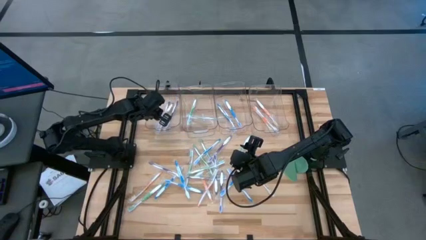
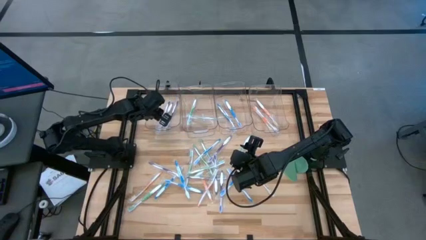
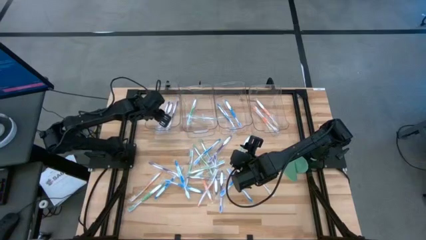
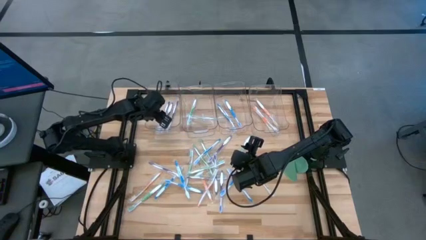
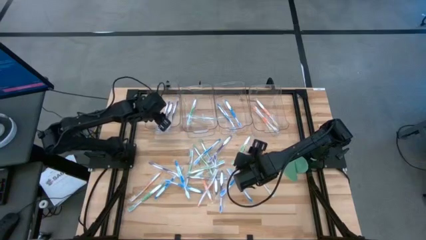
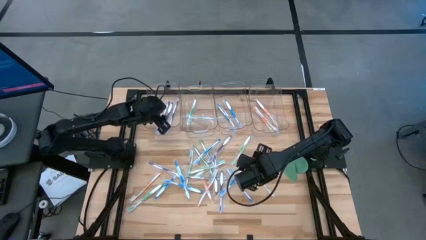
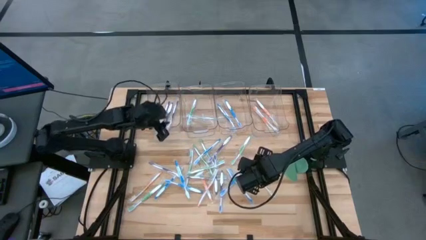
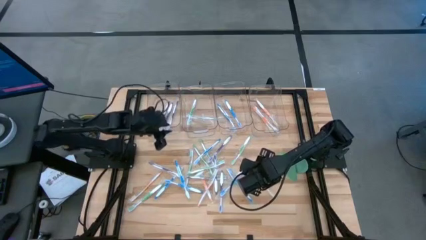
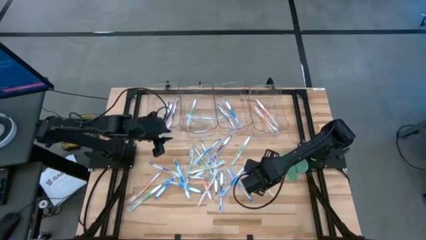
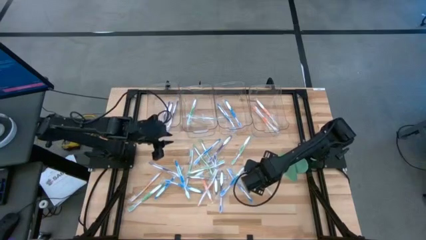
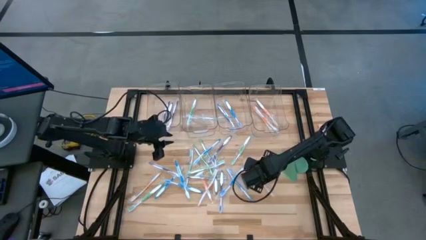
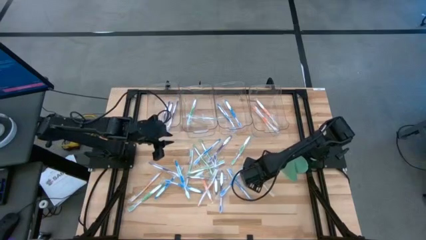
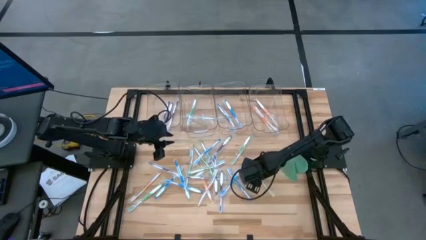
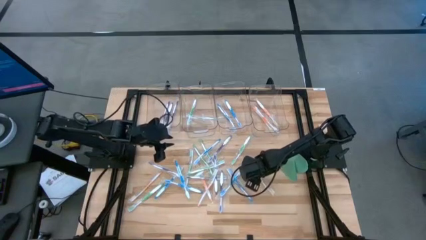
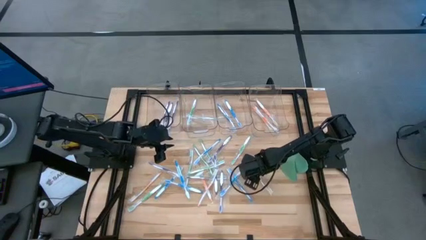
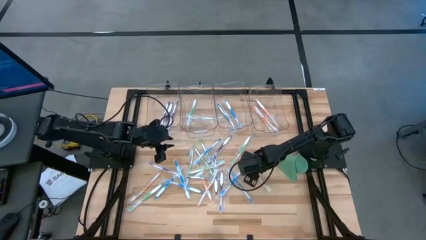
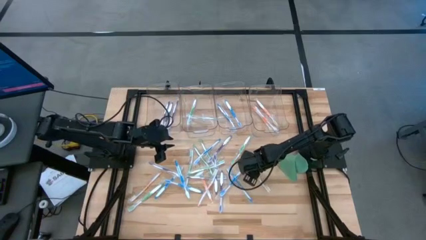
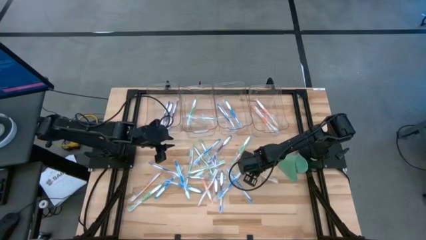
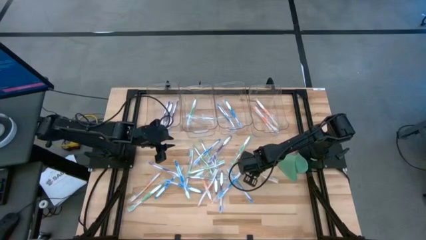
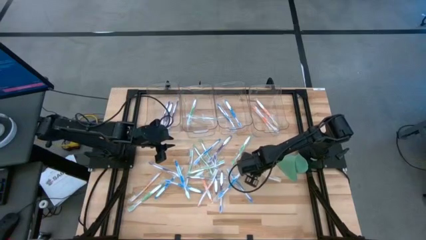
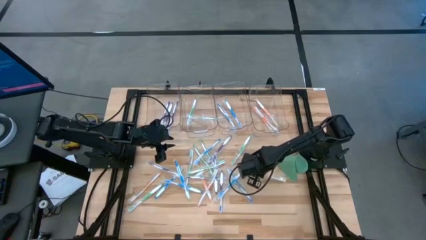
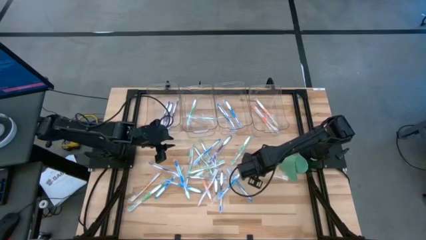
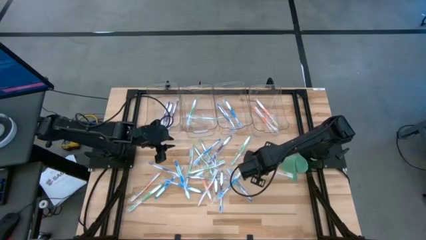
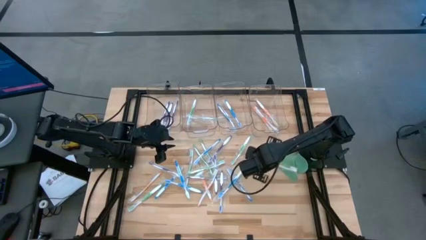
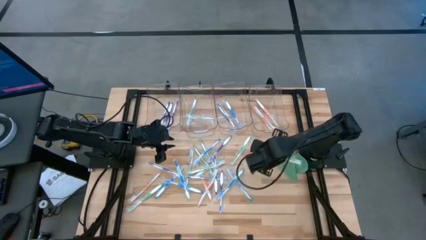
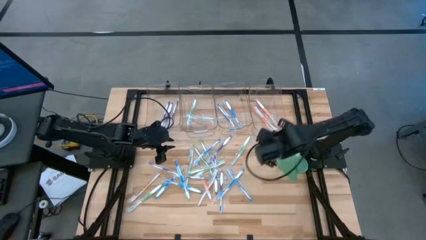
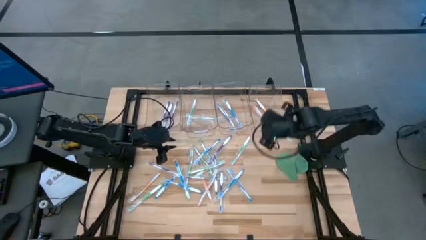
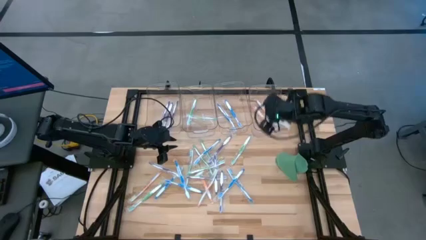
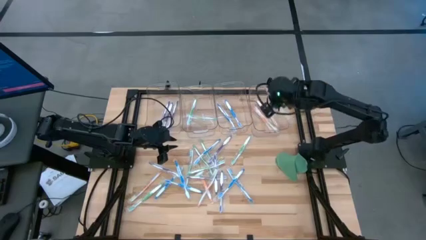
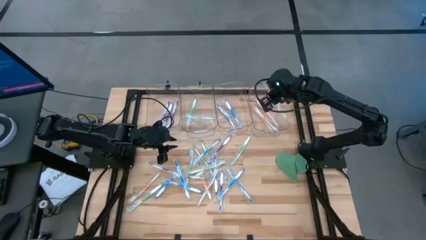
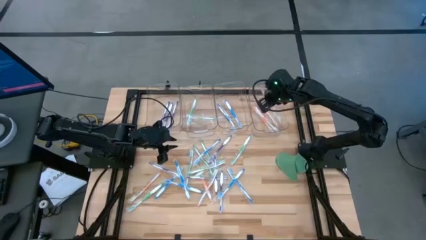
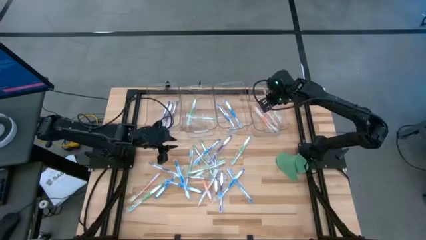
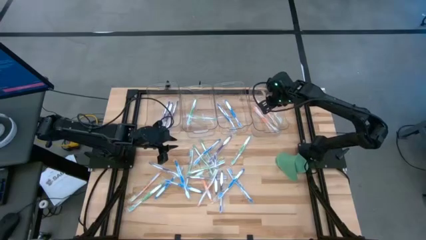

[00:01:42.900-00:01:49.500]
Task: Pick & Place Toothbrushes
Put the orange toothbrush into the right transparent bin

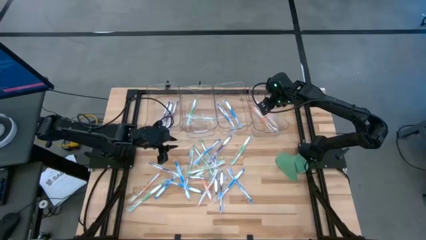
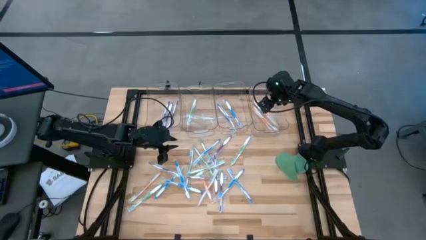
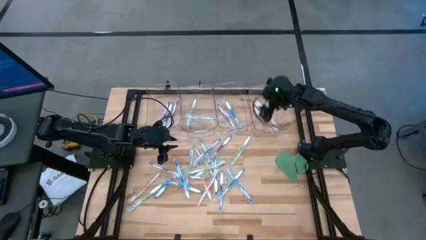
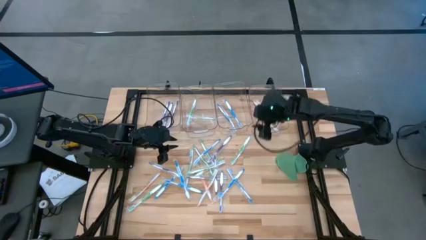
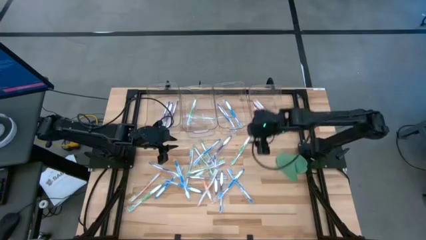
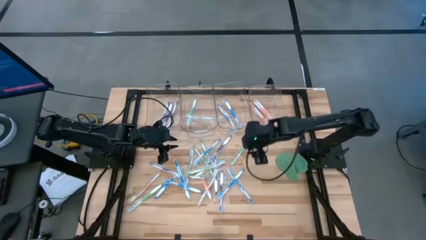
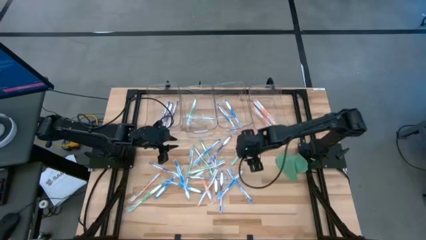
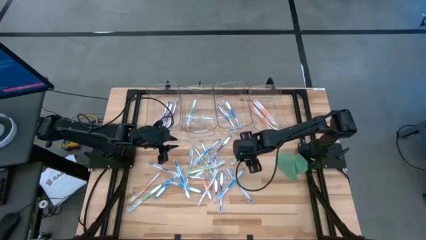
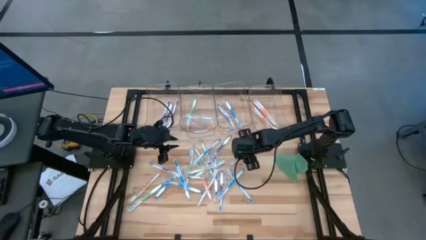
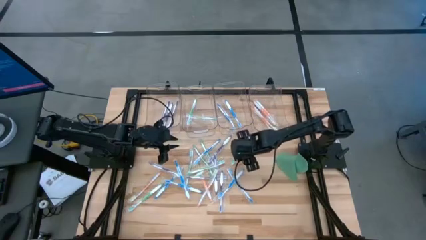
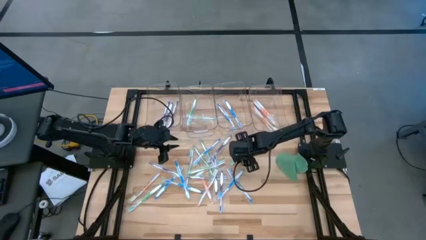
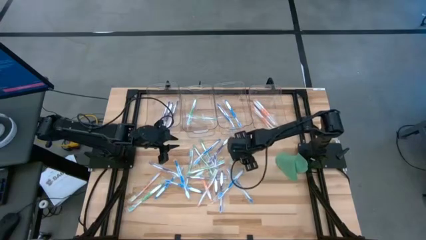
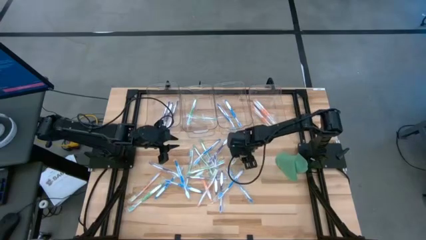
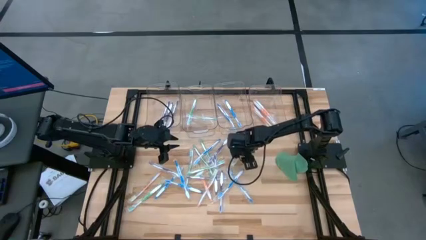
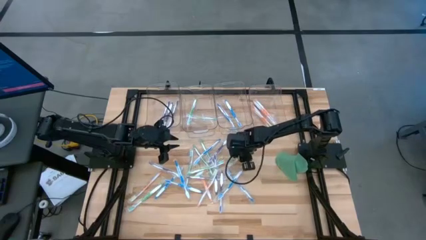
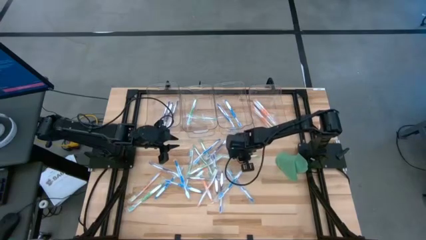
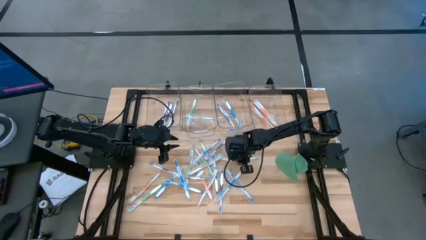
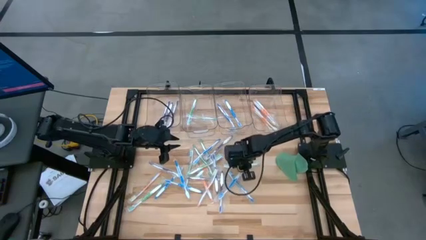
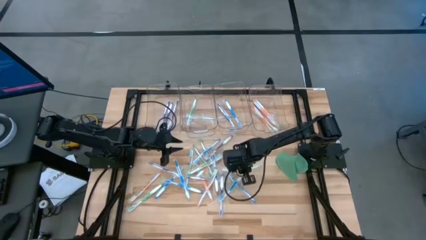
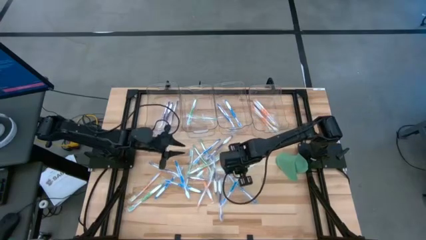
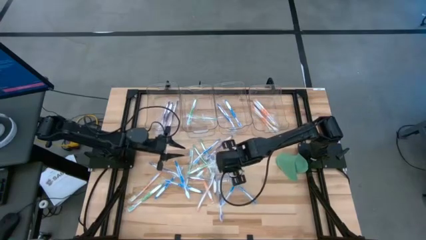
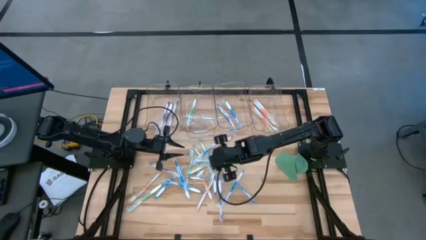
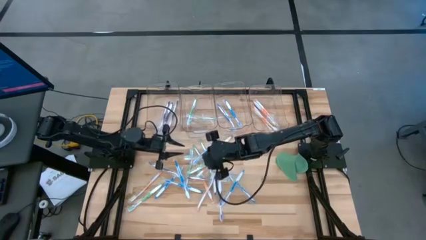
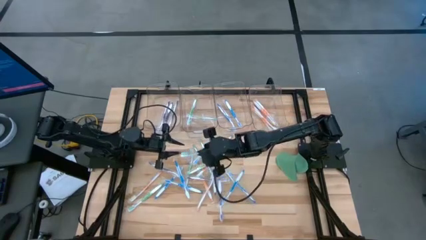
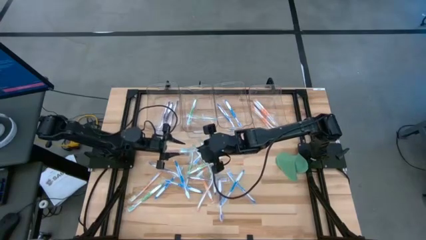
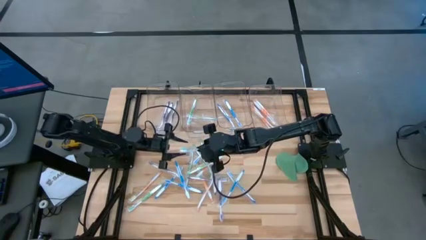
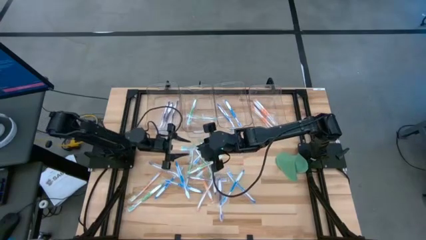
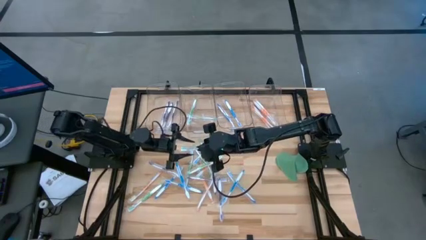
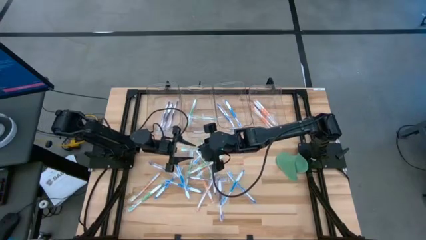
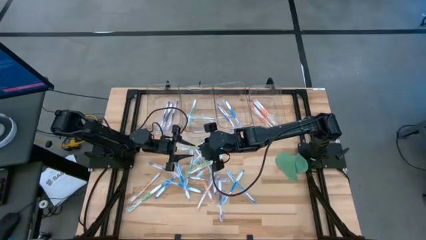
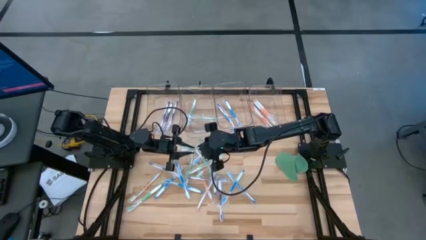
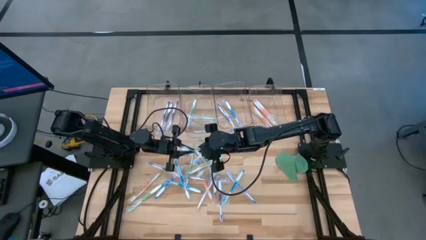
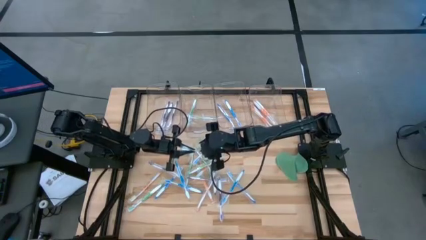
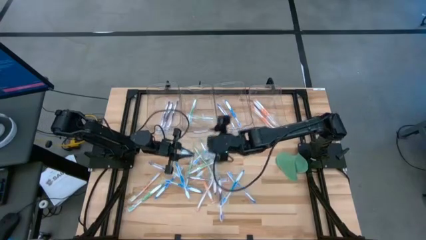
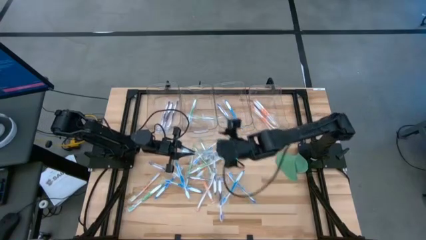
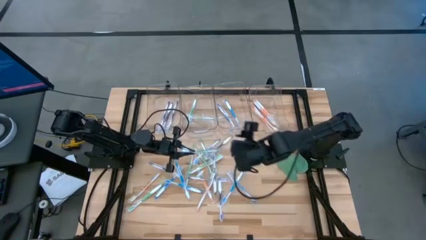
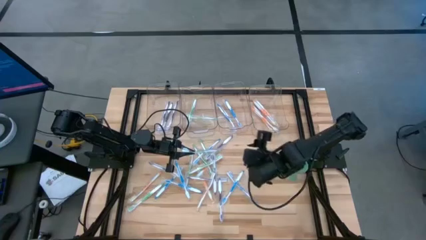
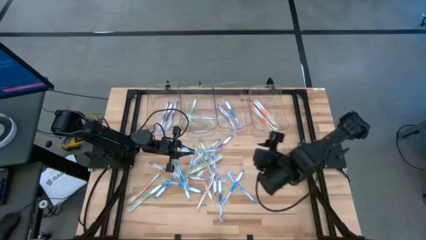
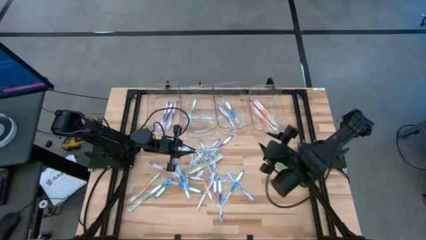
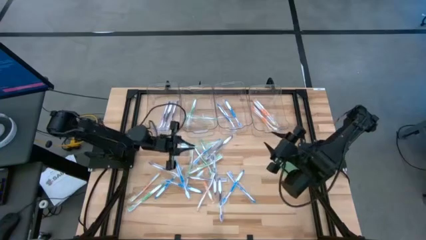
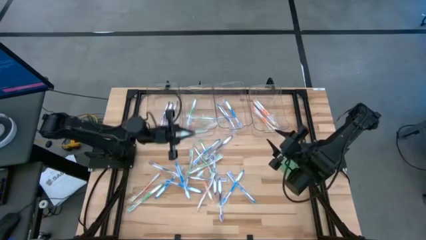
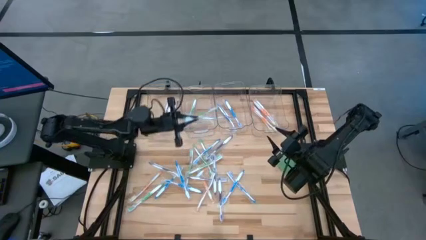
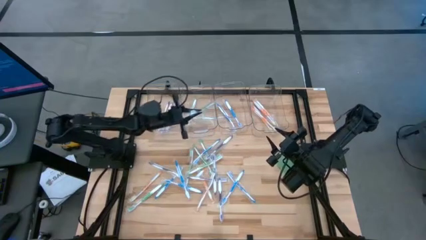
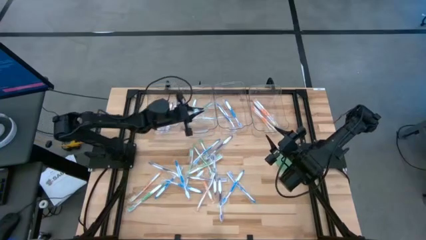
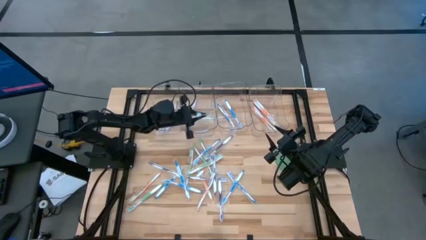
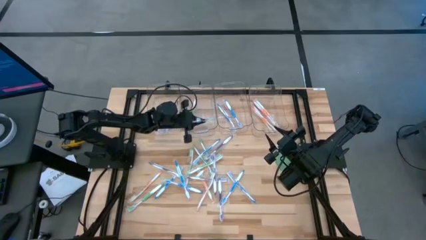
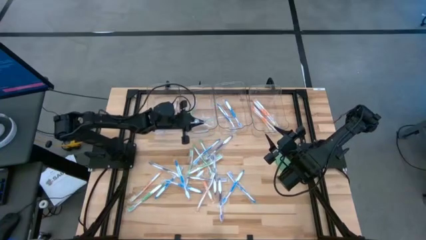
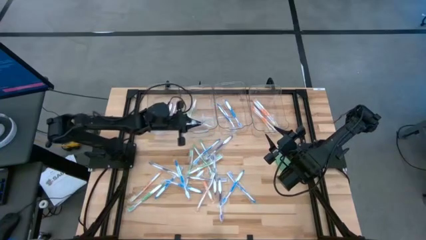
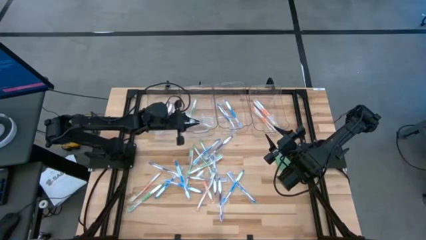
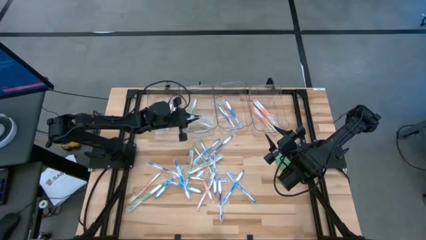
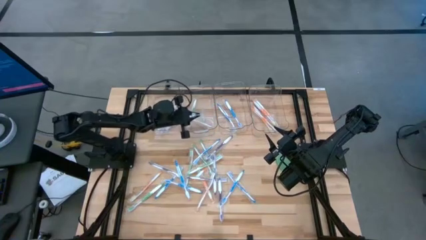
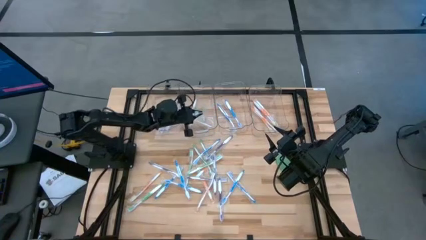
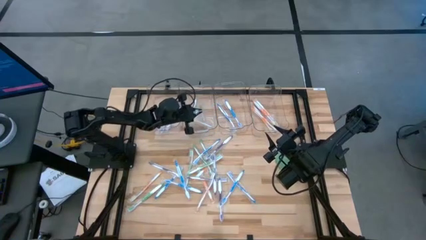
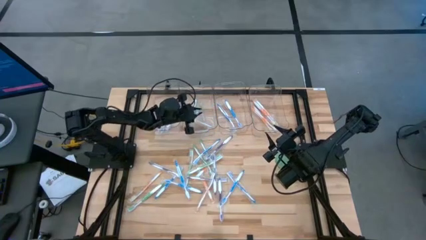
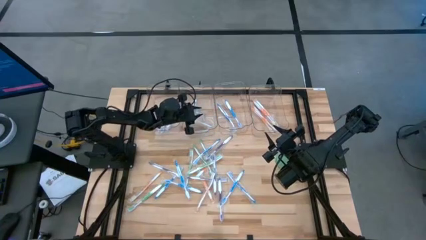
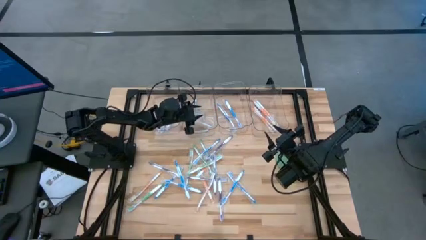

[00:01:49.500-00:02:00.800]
Put the green toothbrush into the middle left transparent bin
